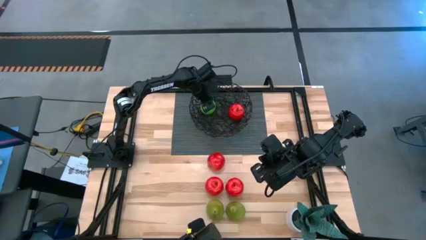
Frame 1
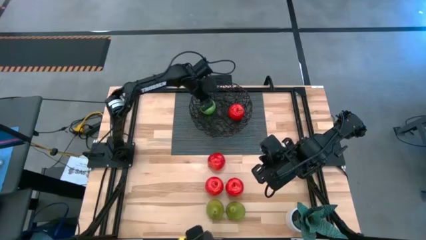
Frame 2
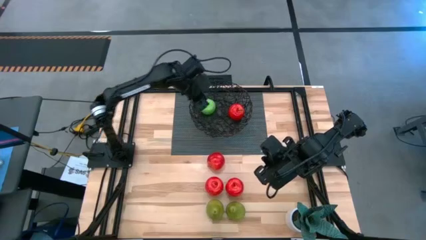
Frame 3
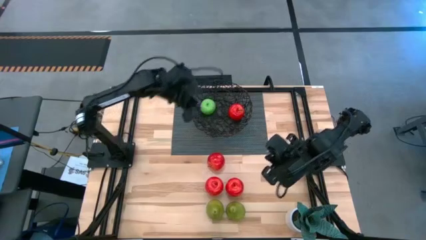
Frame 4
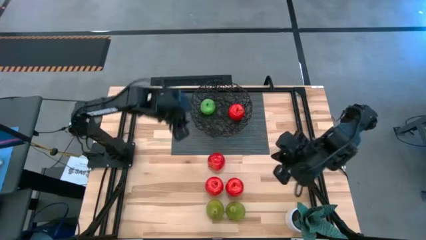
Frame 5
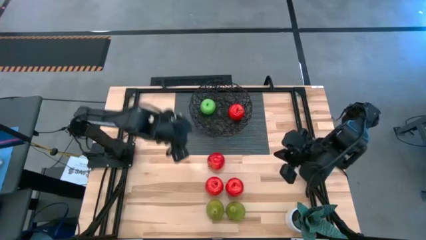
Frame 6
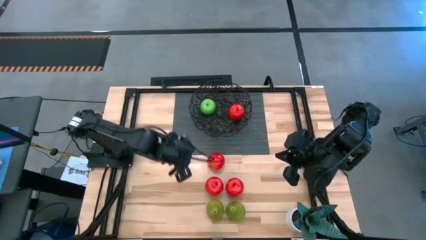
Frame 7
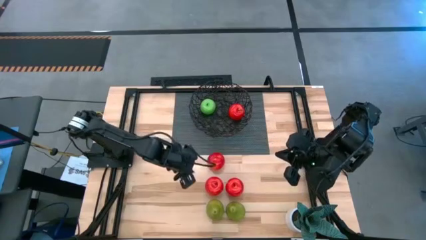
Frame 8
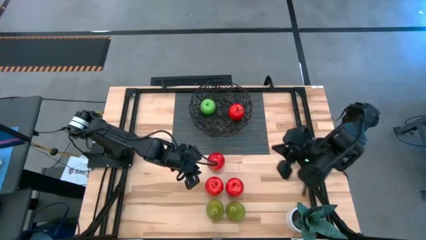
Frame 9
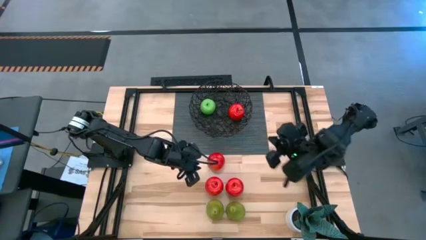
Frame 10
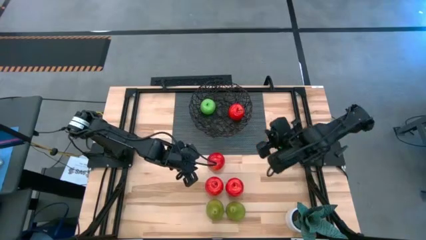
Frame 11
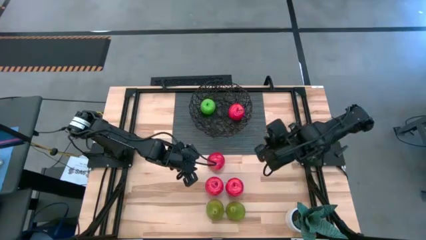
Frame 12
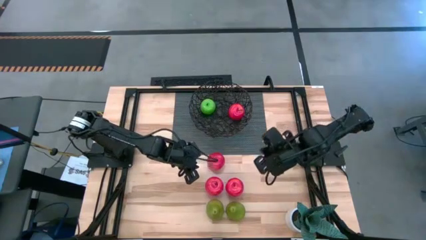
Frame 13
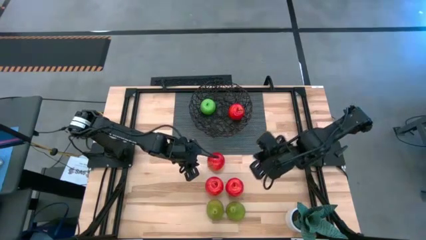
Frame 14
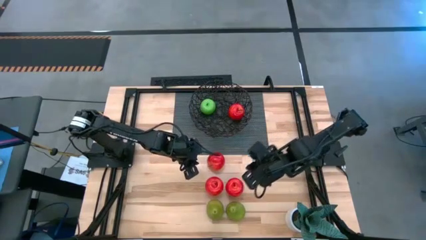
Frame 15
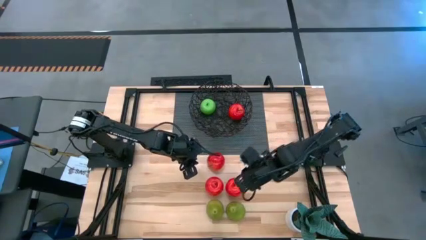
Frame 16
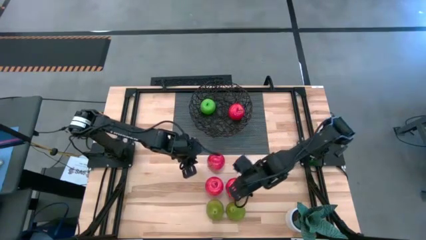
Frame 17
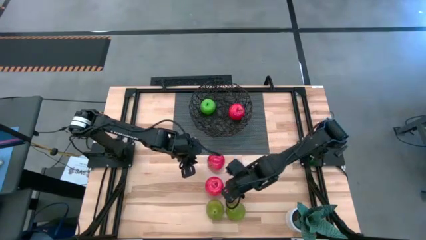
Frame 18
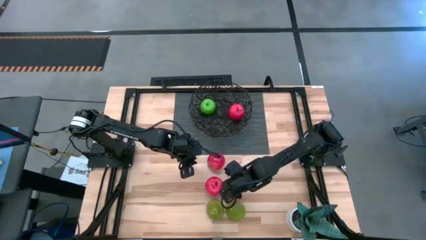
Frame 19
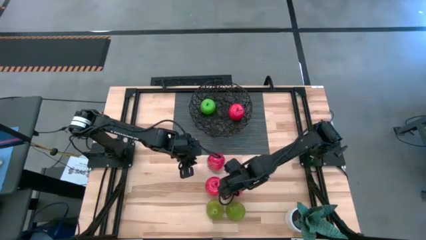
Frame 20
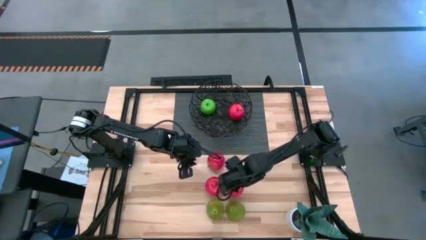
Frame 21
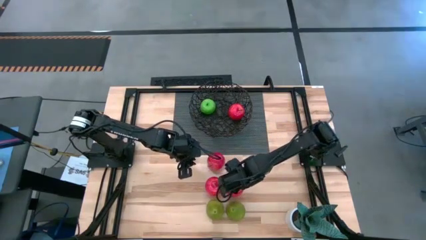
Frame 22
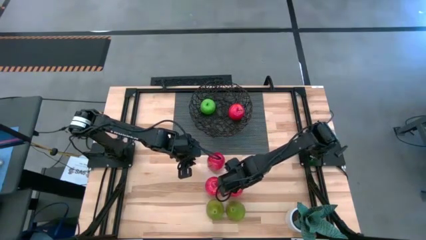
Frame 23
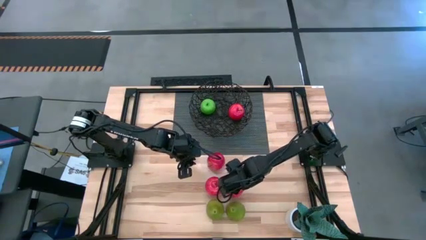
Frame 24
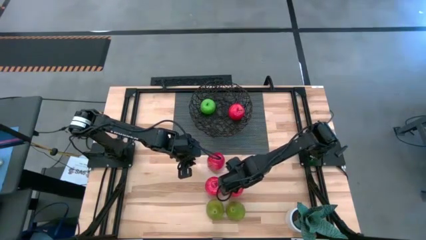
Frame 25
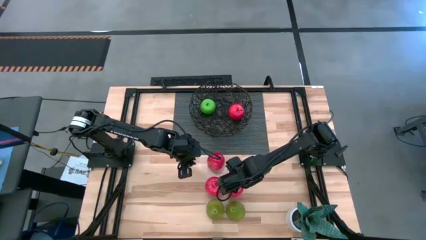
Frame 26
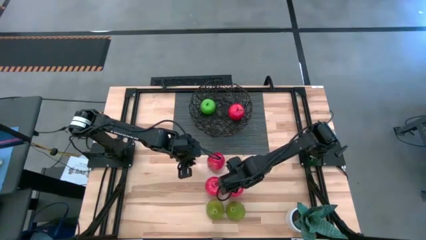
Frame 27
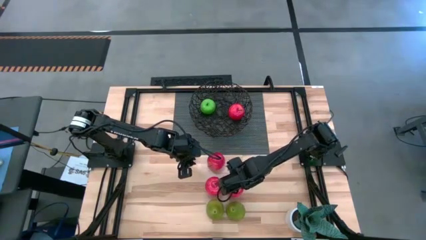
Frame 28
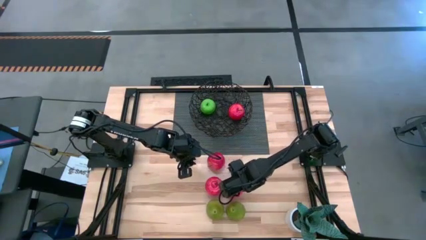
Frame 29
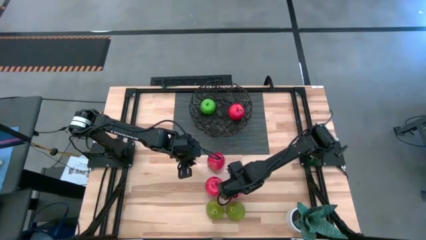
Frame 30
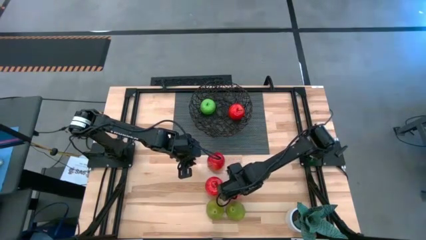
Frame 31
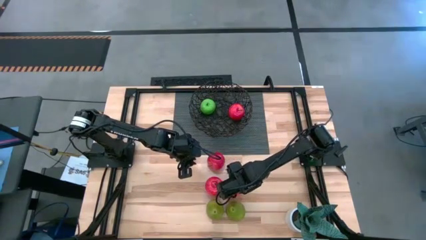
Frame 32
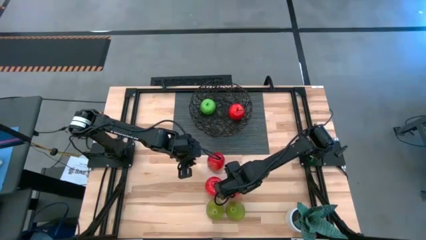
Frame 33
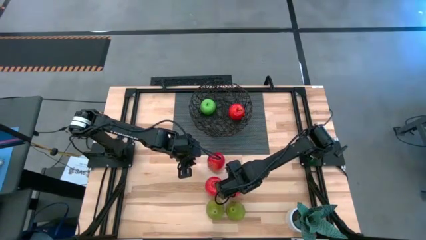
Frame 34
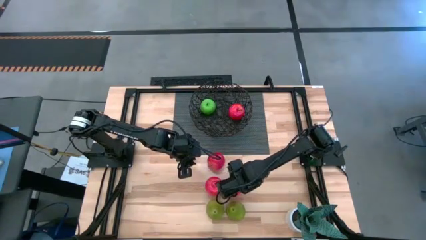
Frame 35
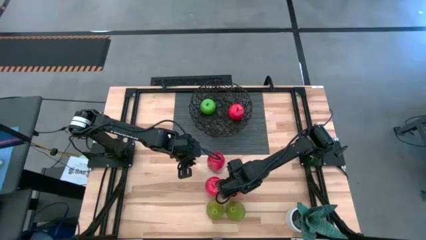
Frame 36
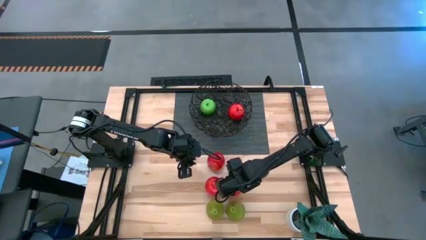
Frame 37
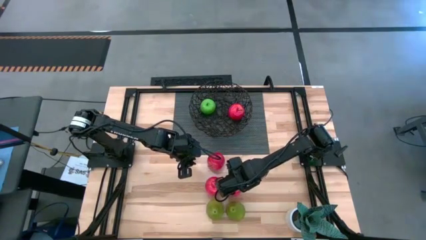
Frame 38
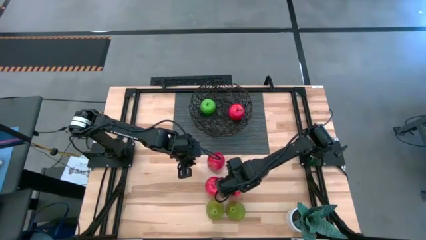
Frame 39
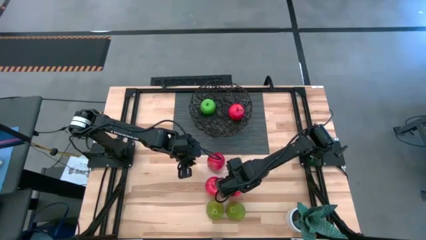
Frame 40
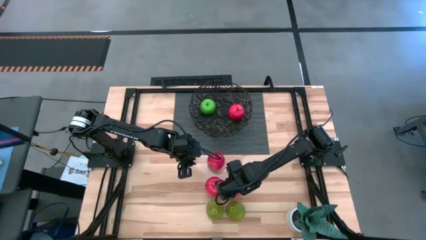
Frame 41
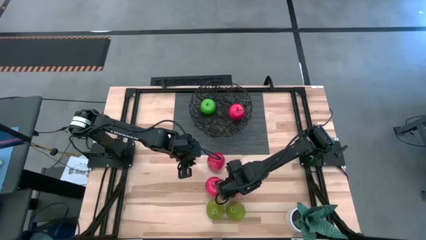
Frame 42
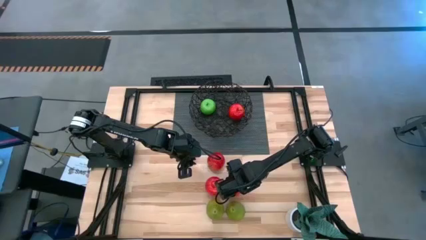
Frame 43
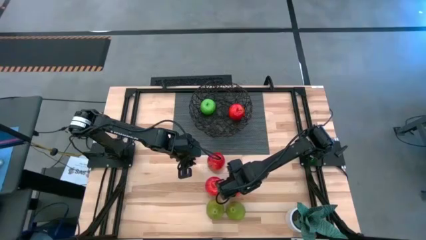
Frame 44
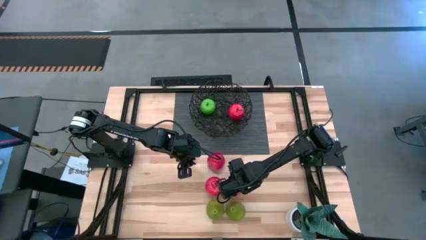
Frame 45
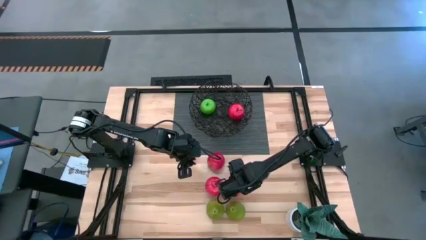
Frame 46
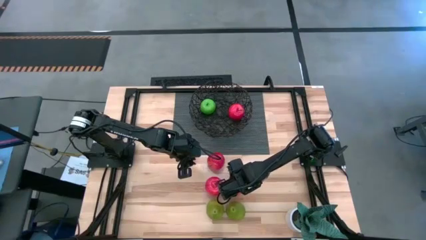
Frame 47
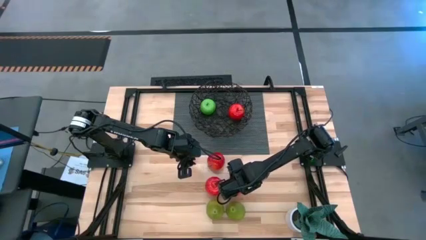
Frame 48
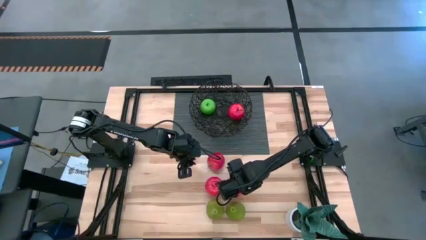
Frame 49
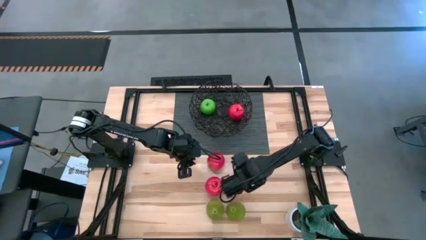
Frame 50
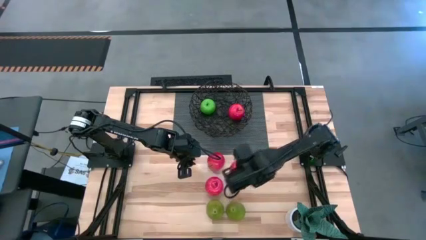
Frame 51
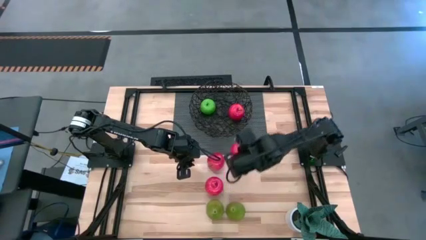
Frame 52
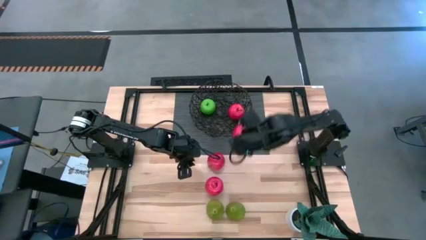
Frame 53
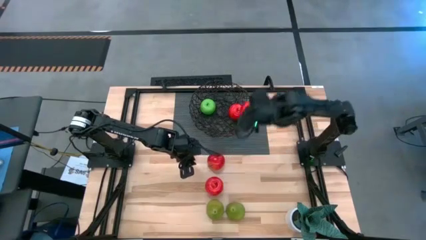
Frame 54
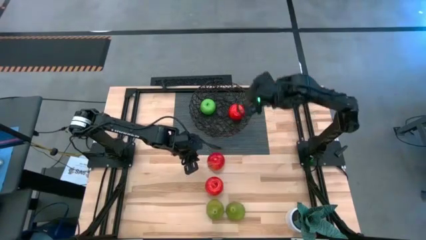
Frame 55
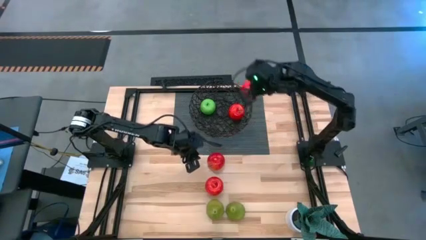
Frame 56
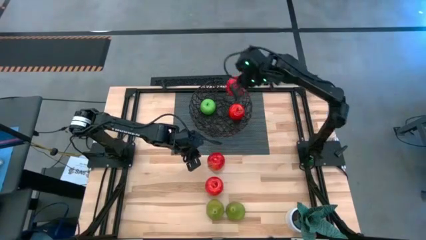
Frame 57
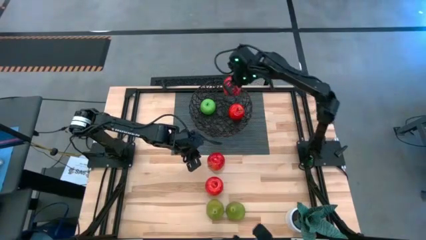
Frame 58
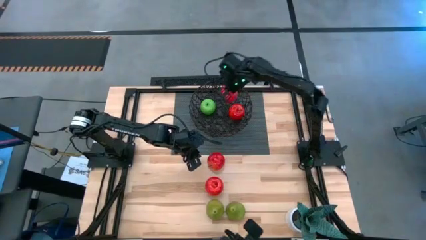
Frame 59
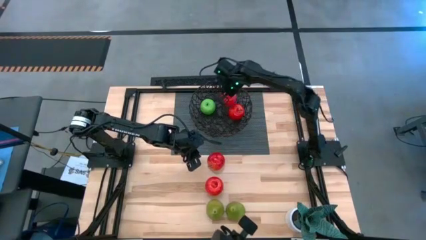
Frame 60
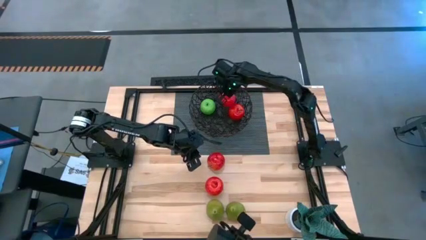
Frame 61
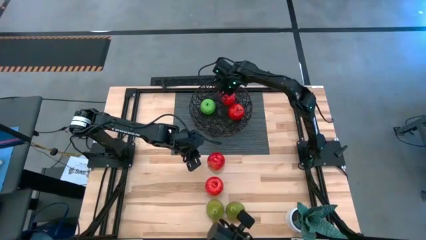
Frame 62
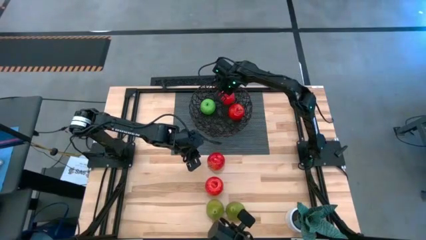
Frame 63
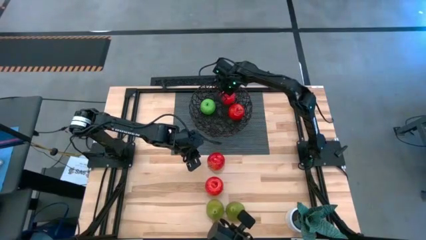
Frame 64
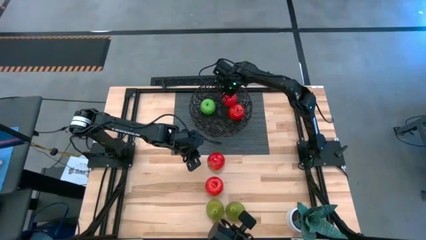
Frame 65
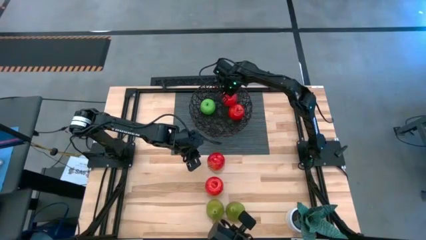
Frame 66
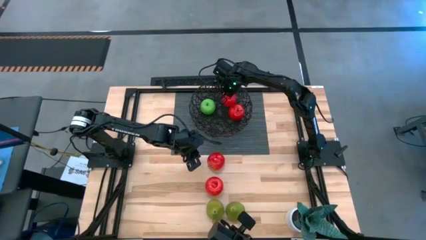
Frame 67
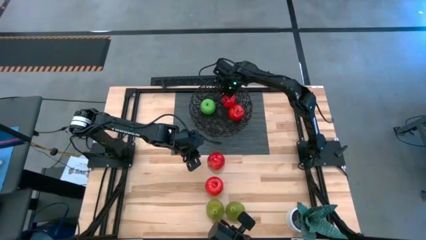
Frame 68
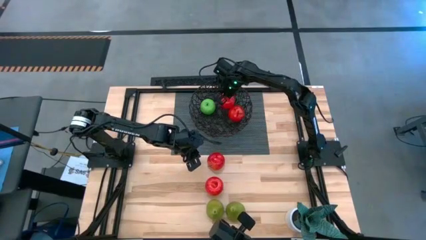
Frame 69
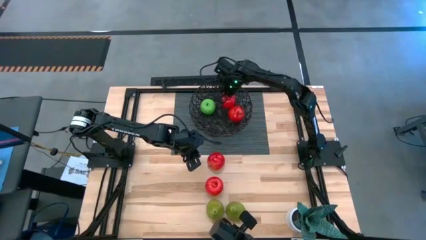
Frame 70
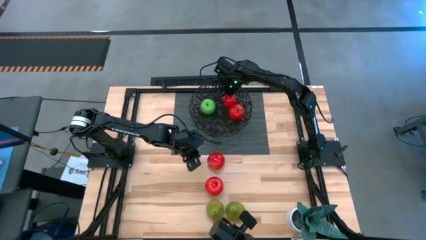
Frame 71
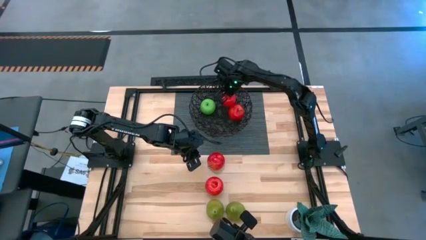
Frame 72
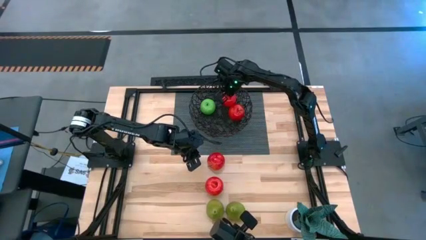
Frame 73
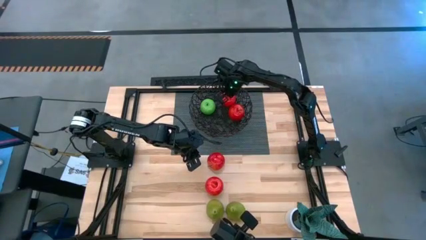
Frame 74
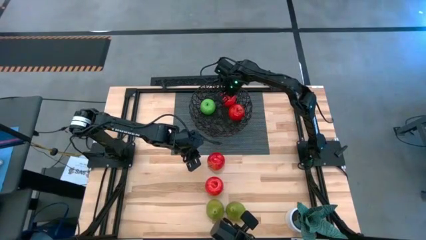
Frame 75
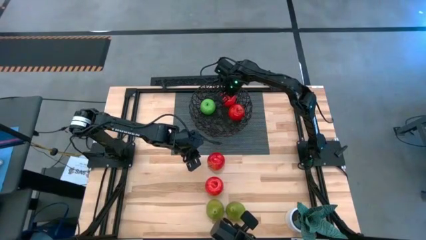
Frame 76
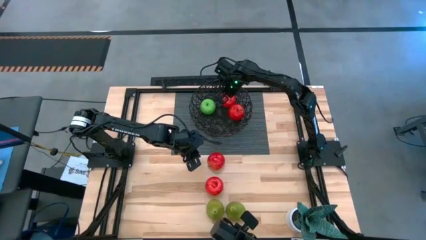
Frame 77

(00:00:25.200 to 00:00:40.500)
Task: Build produce basket
Put the red apple into the black basket
